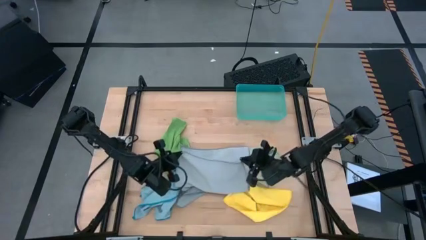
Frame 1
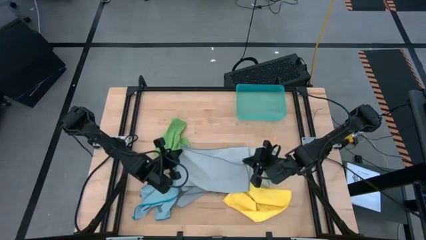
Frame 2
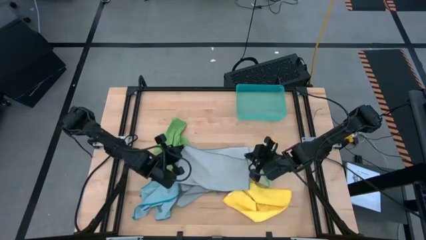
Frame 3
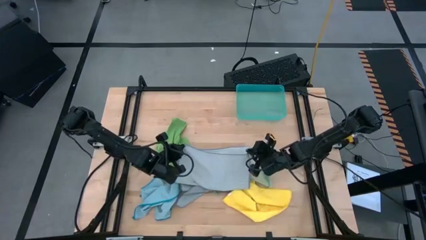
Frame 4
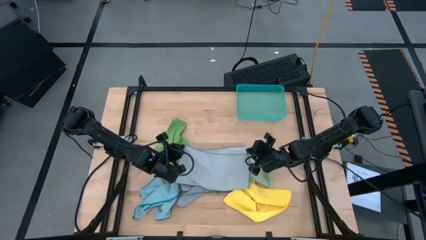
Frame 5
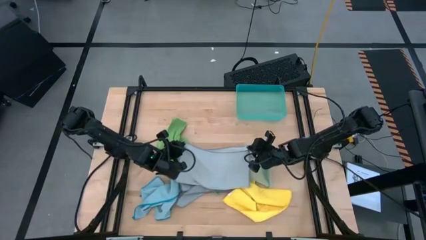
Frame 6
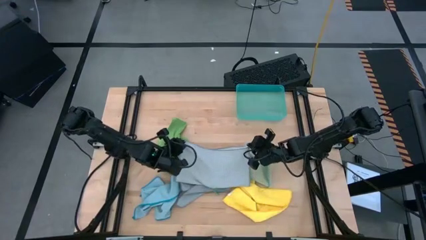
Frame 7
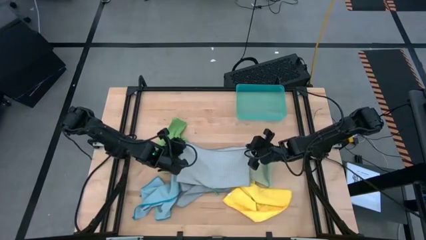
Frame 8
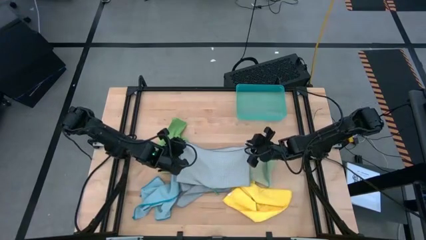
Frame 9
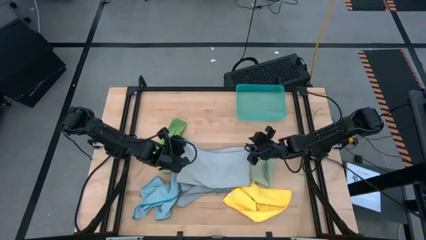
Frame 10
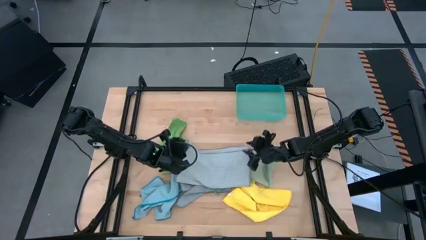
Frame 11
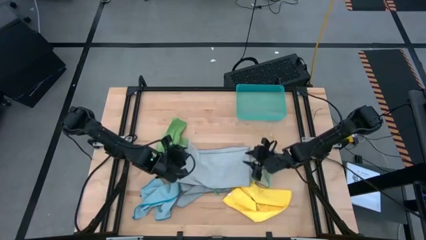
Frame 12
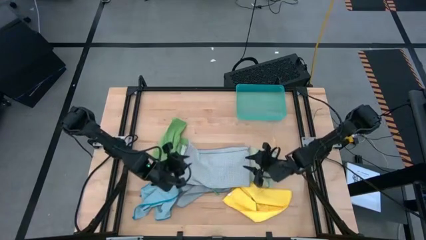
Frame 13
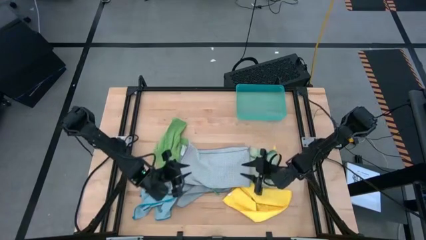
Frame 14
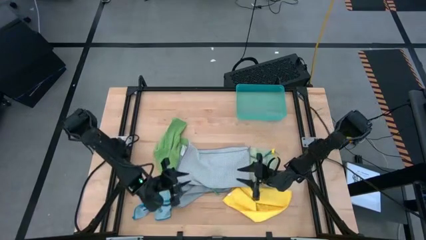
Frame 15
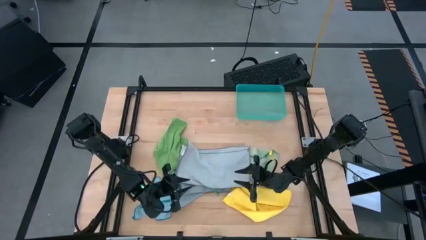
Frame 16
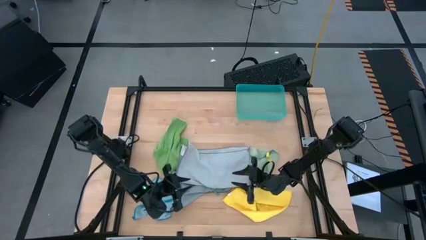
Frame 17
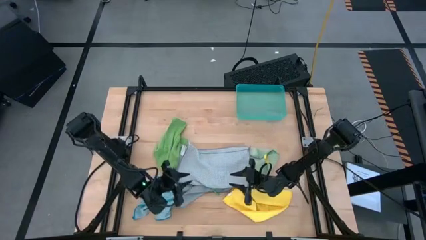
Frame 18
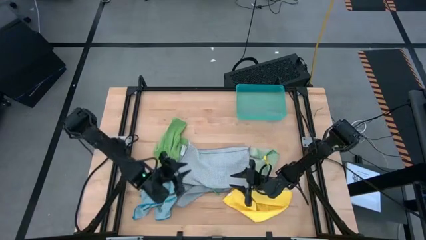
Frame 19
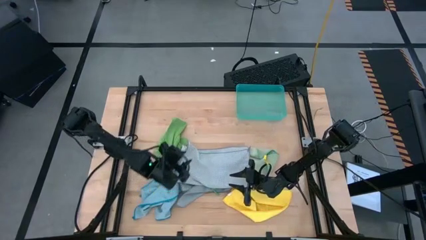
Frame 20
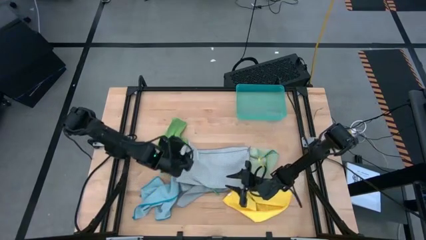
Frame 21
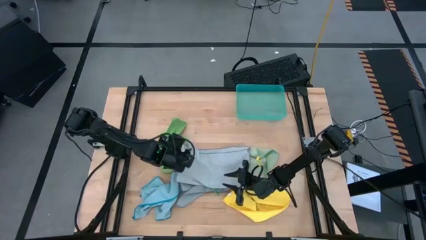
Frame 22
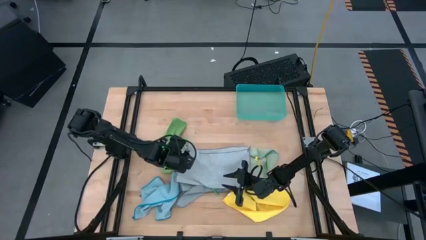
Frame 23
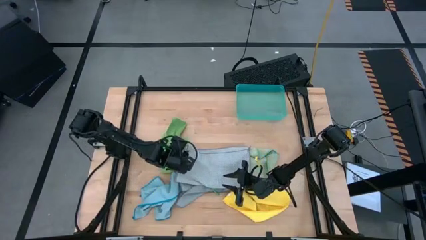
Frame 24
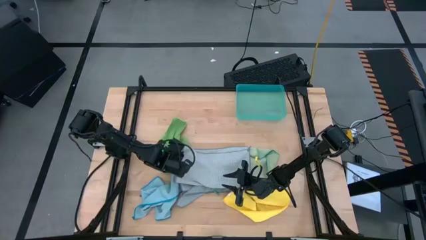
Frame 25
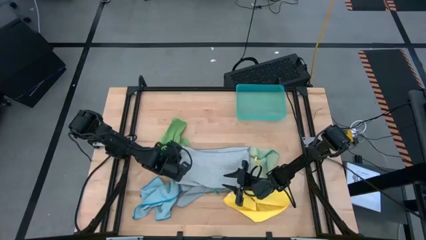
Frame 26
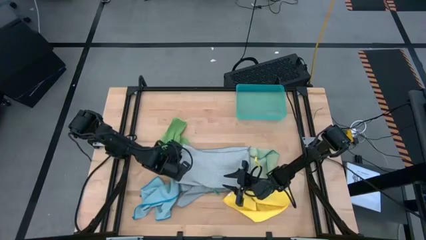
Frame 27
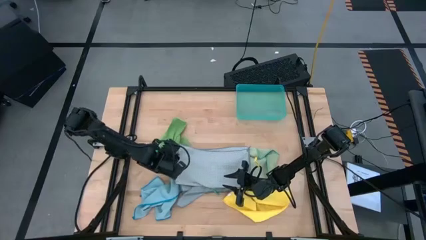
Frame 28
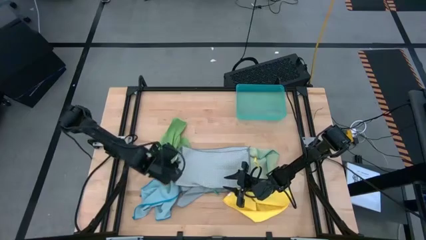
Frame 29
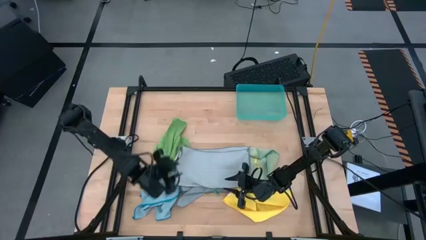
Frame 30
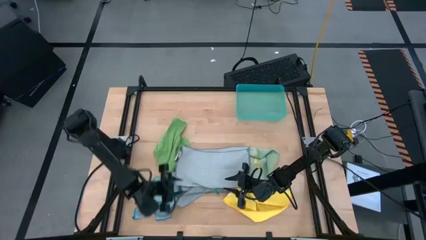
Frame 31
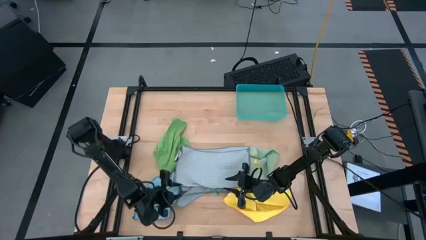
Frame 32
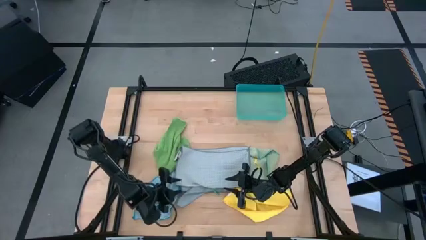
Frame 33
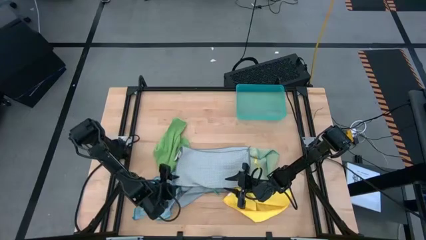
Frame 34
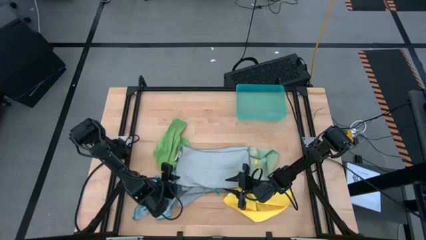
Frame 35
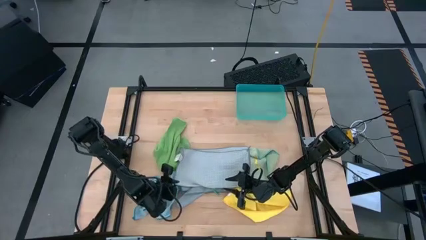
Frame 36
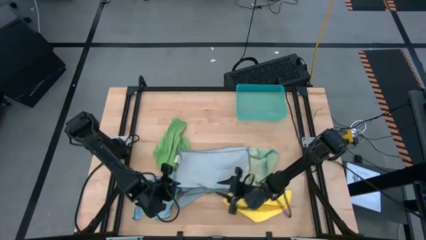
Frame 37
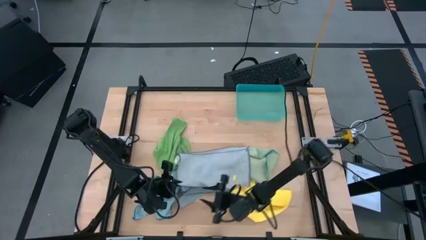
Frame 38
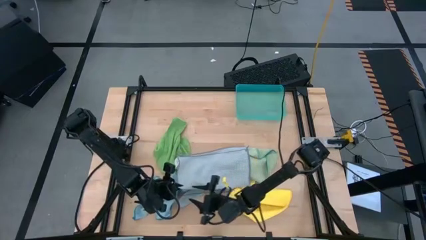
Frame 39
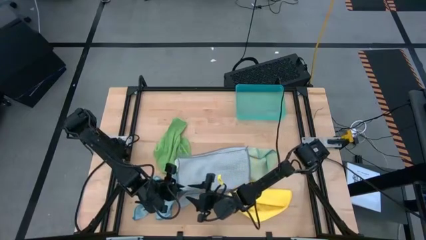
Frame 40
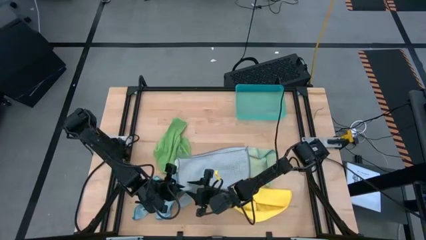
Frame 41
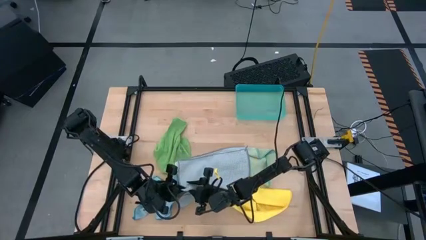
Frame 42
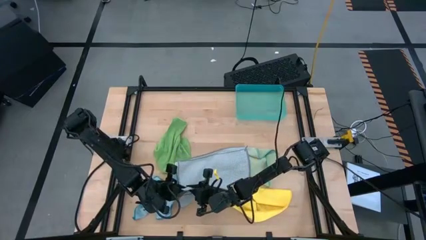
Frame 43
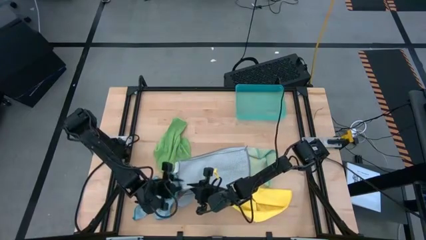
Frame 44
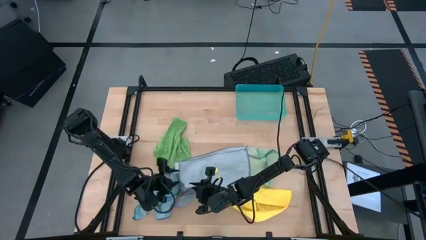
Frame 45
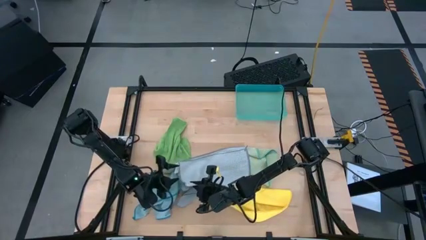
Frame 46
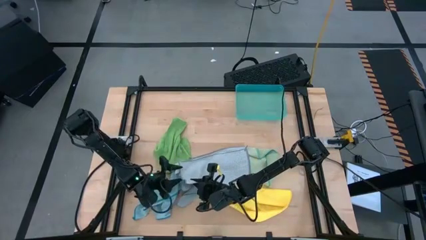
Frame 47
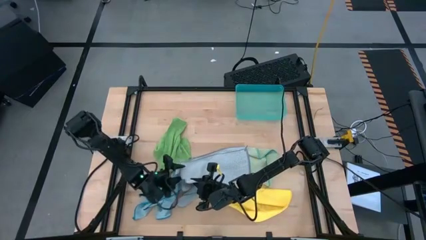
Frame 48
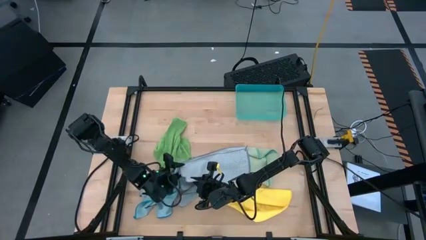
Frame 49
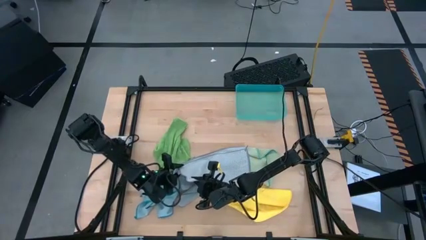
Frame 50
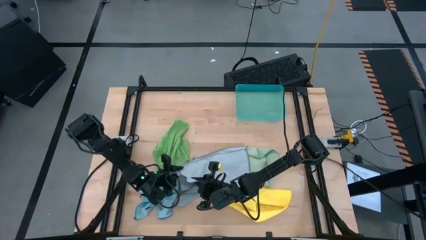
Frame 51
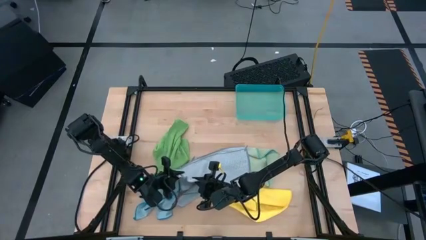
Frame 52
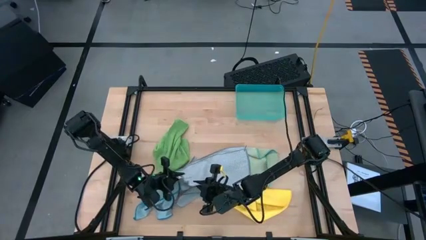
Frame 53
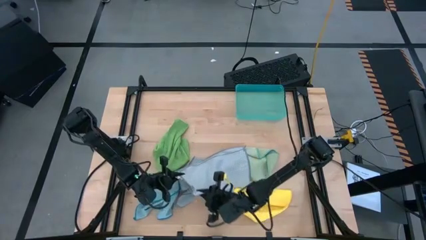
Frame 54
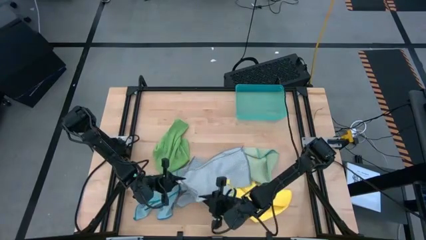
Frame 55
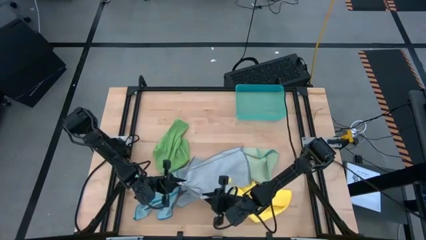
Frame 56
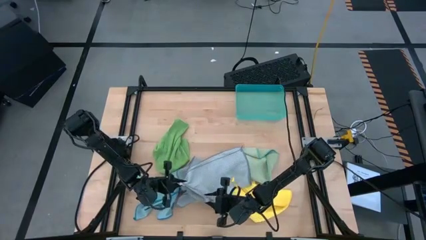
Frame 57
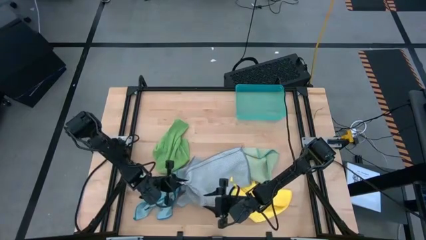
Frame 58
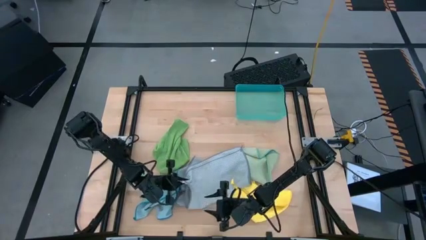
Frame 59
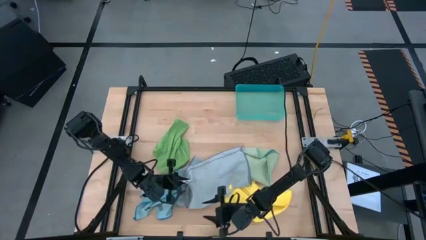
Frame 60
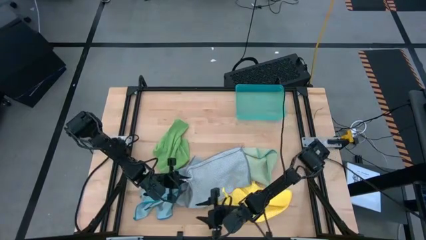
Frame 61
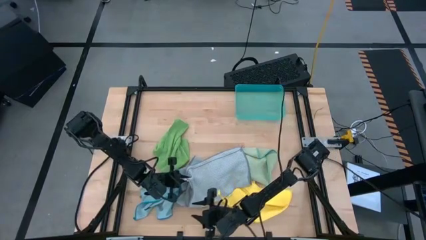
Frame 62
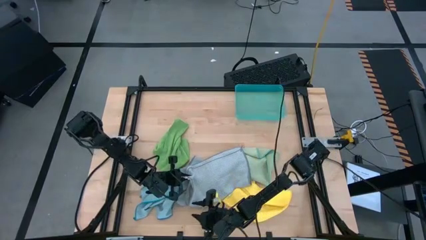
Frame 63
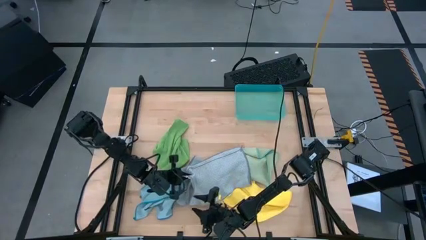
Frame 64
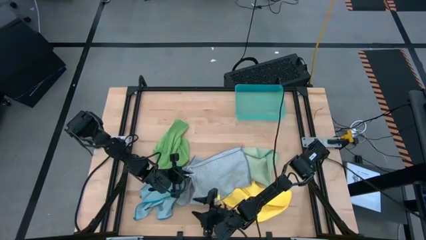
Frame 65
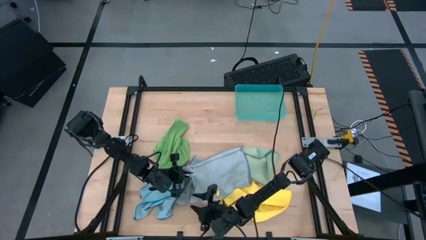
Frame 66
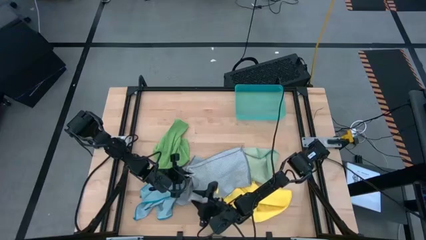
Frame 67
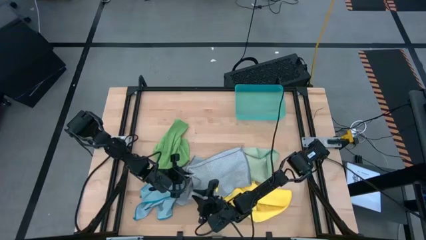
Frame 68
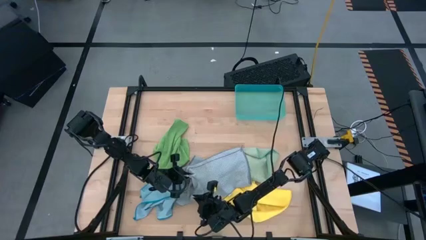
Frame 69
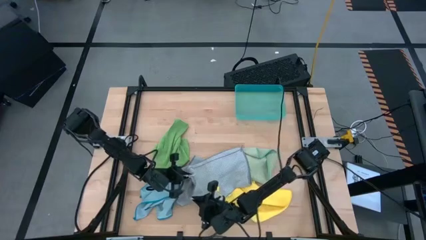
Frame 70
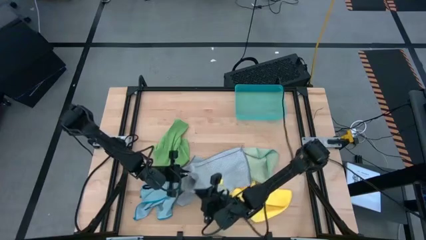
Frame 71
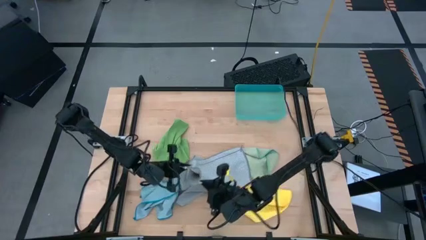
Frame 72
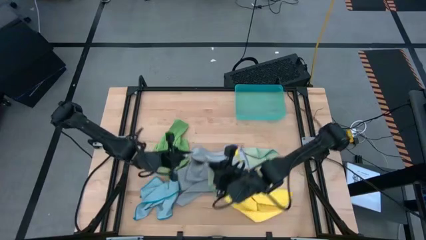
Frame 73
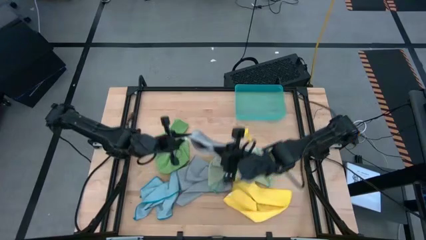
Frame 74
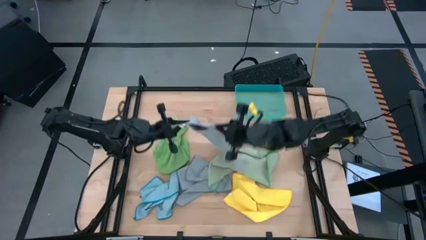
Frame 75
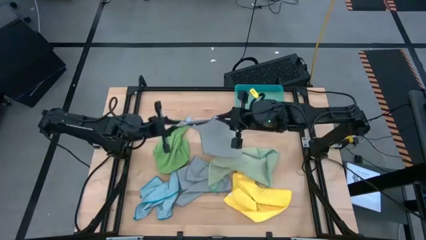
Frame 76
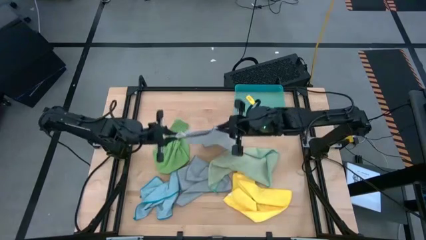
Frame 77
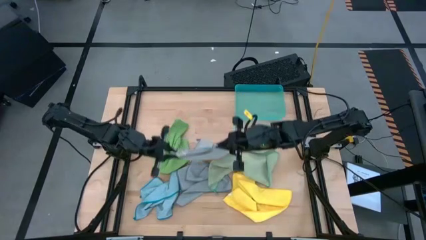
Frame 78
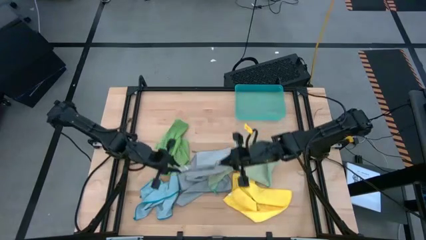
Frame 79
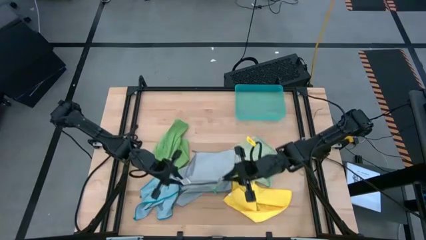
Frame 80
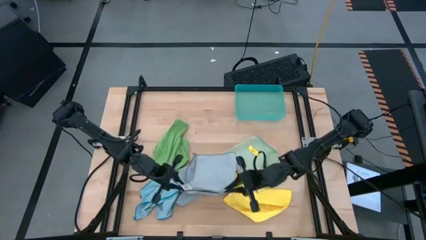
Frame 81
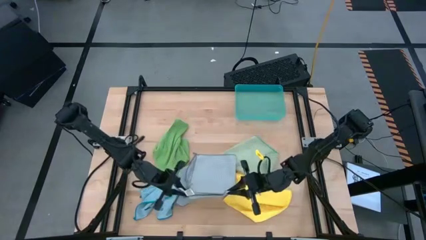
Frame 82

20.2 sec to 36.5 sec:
Task: Fold microfiber towels
Fold the right gray microfiber cloth
